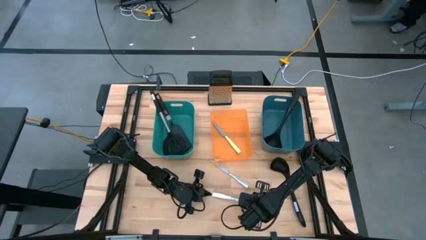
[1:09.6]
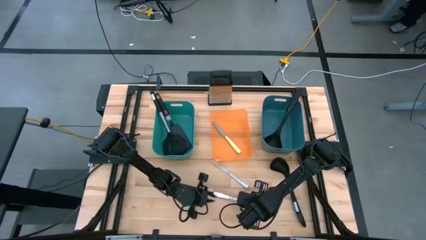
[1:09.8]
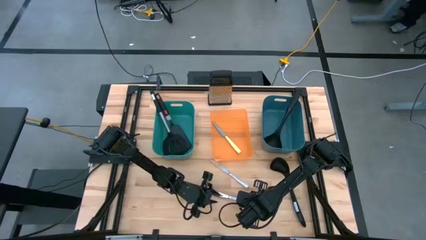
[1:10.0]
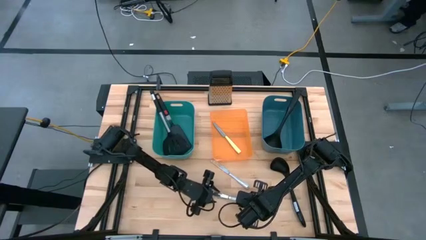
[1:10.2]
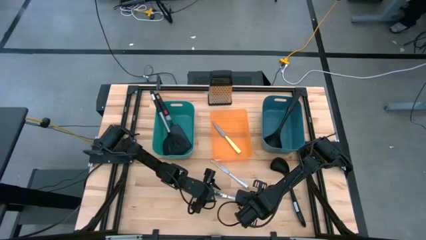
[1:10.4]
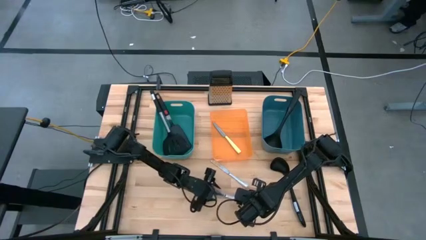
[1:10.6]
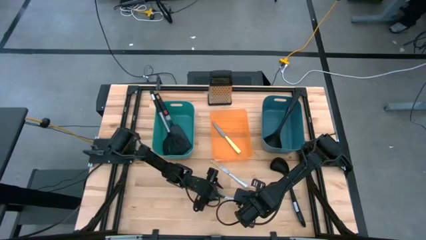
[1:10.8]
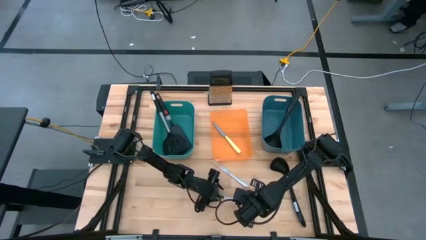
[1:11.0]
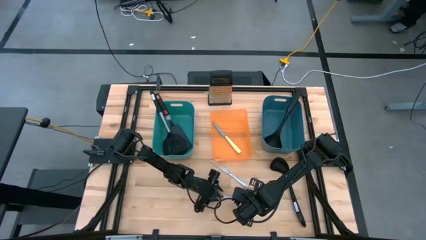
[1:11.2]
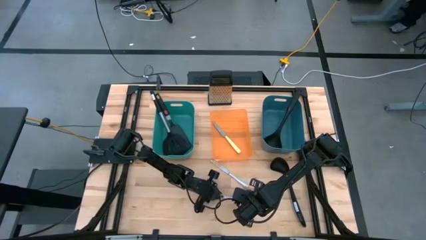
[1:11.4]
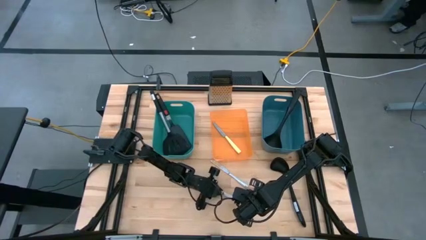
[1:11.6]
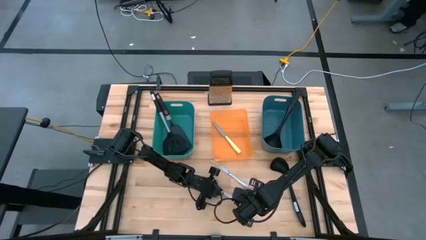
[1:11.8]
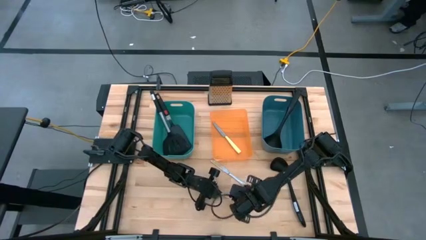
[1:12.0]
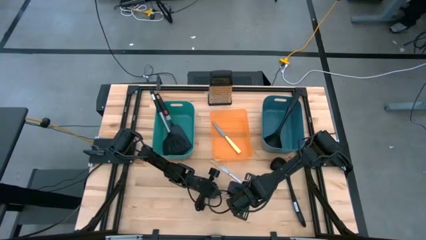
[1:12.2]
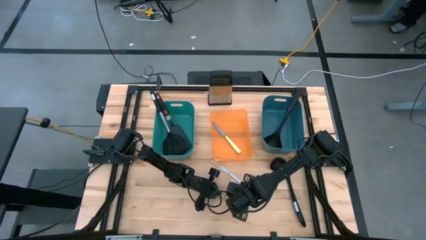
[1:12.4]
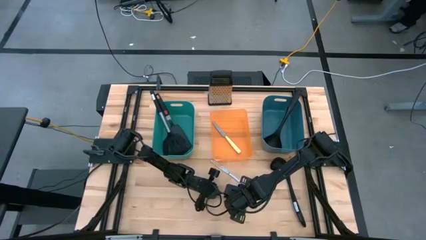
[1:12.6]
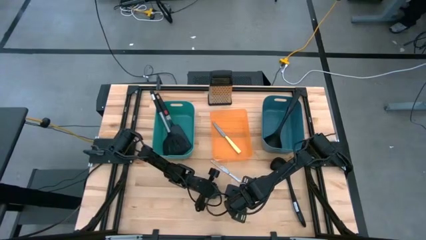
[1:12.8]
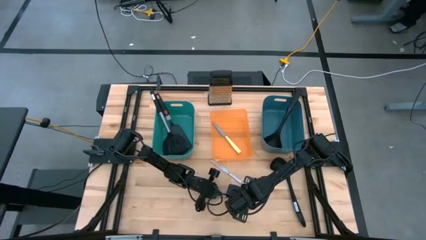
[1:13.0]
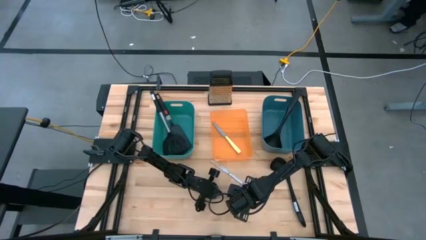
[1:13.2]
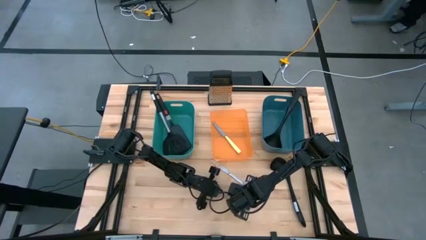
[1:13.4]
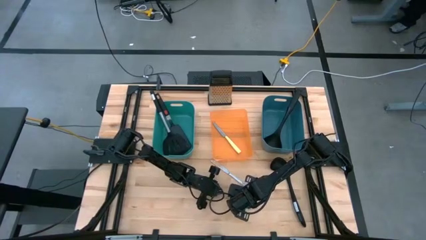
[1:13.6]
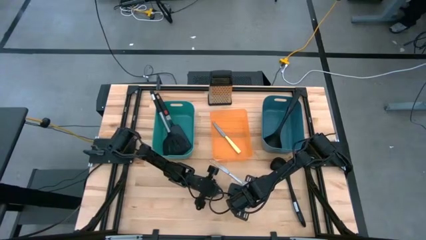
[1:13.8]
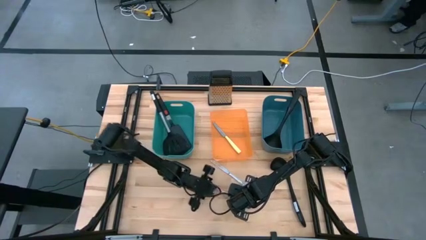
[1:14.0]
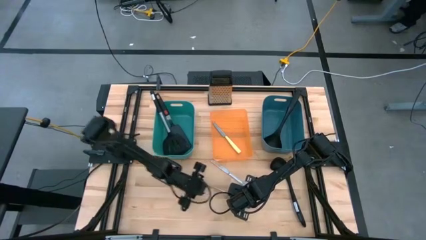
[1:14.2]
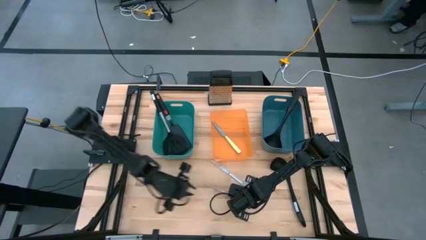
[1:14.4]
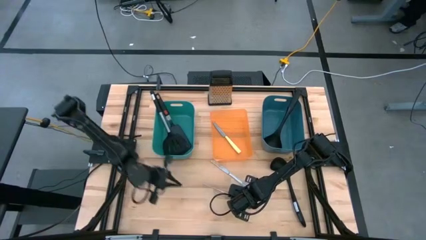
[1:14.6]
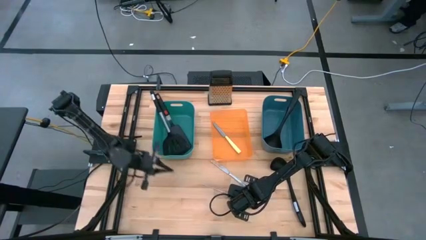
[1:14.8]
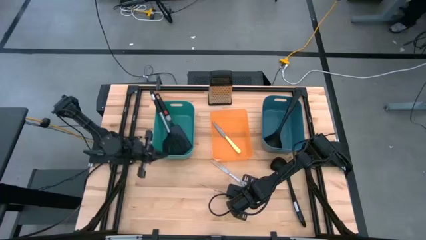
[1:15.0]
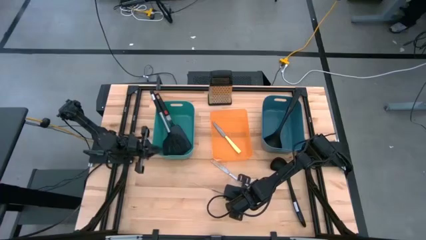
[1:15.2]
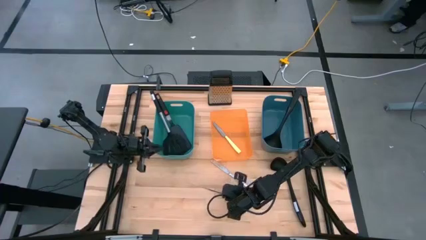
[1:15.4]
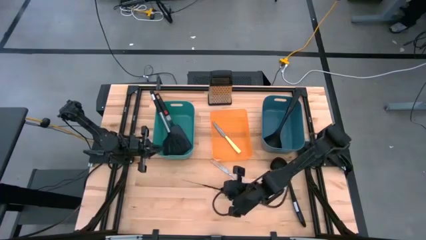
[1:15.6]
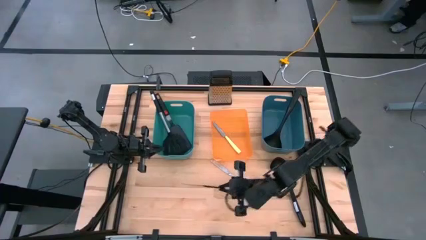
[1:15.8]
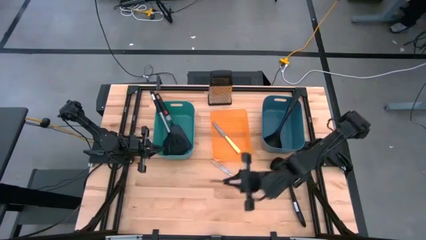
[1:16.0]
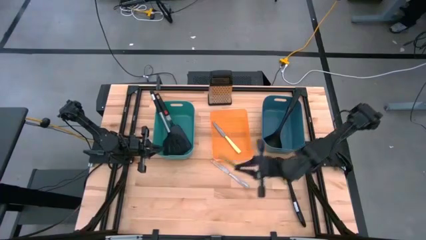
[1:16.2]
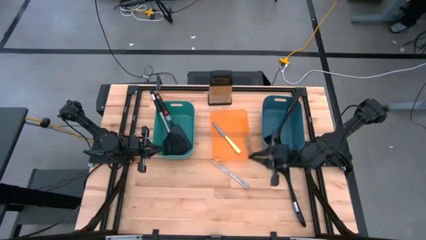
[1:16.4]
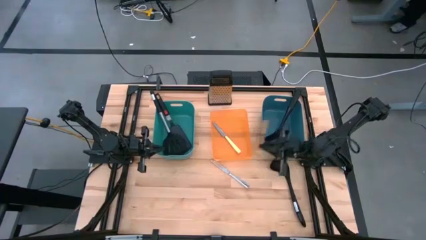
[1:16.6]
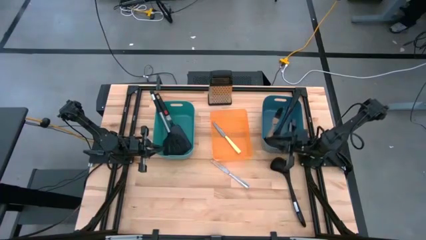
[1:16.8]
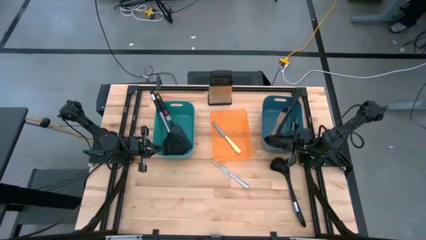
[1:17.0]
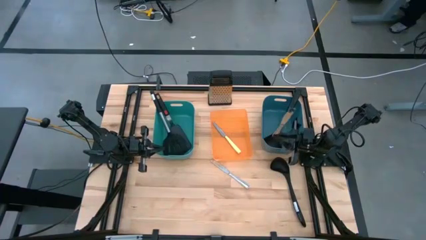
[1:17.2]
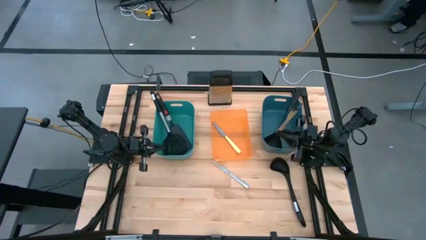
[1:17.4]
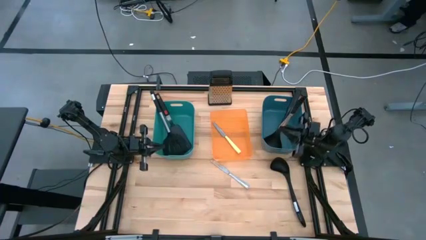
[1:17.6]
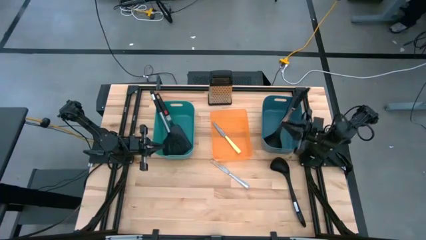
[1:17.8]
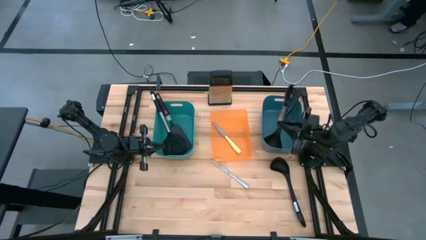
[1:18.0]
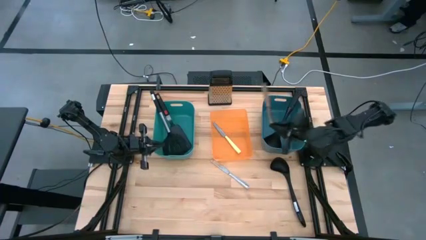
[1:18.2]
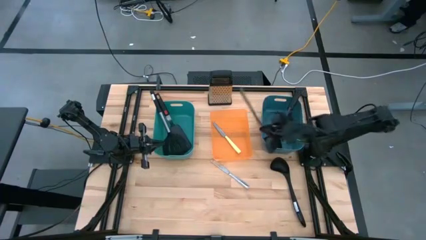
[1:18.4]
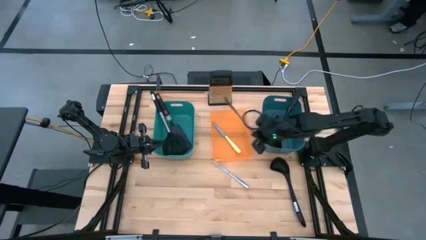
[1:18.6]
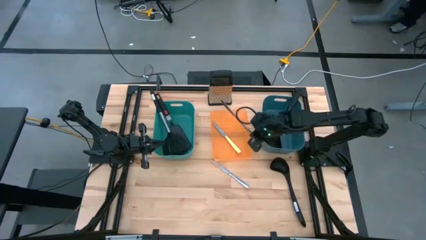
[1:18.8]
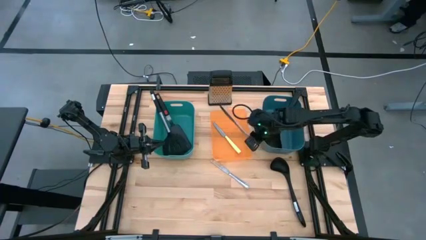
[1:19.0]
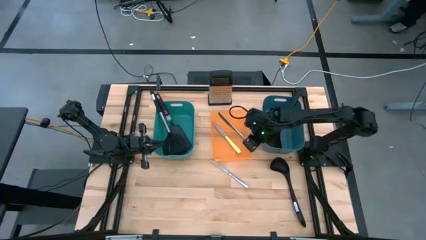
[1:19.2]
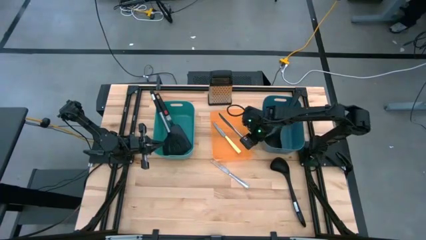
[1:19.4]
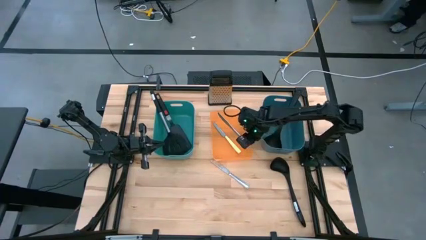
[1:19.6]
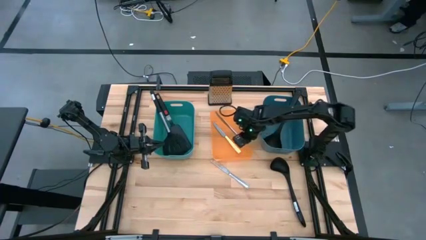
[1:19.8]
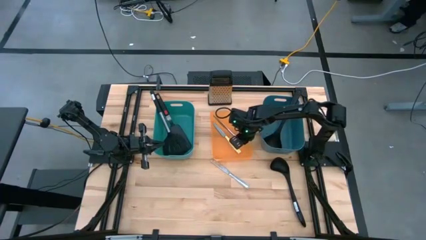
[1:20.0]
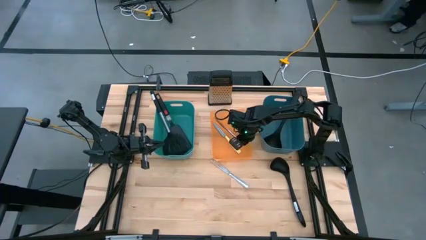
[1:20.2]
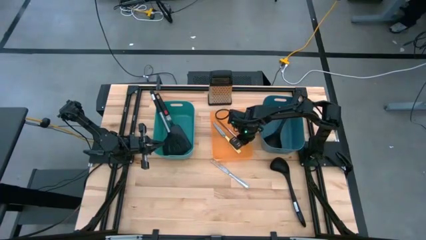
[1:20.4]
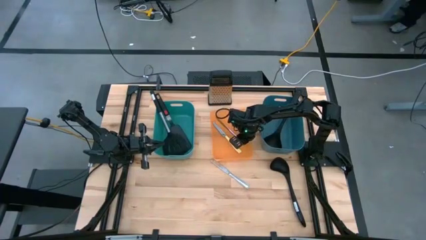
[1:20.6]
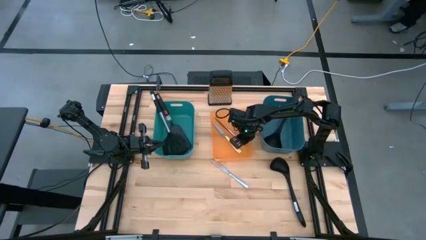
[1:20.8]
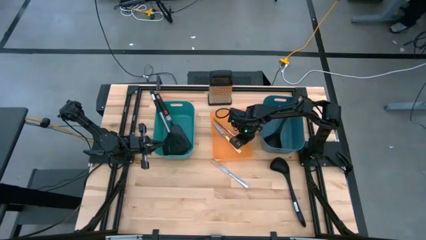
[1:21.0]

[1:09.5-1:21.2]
Task: Pick & Place Kitchen Items
Put the bottom silver knife into the orange bin

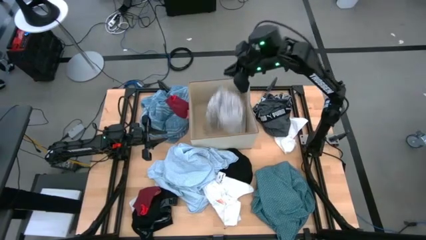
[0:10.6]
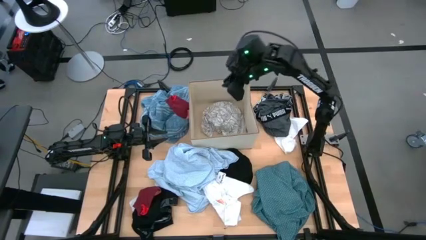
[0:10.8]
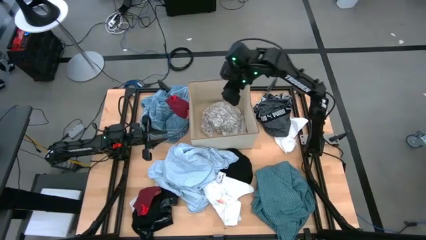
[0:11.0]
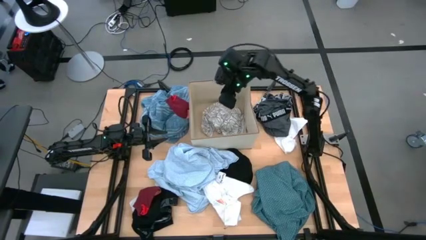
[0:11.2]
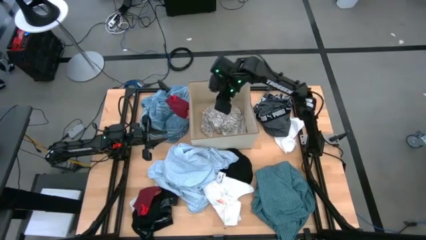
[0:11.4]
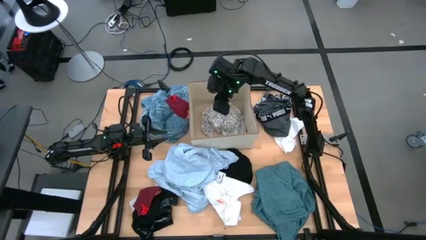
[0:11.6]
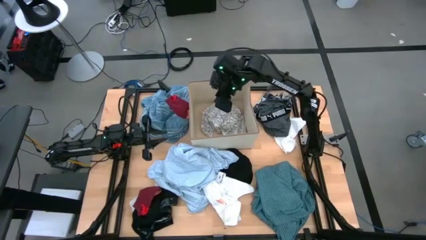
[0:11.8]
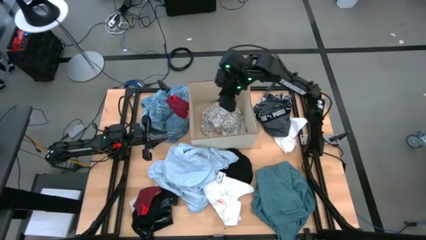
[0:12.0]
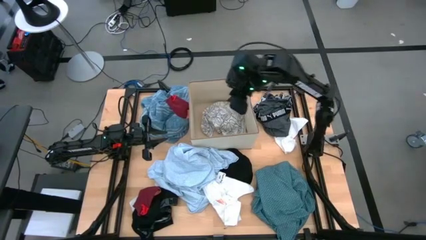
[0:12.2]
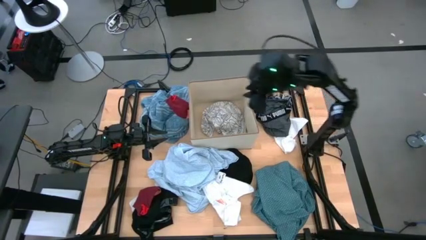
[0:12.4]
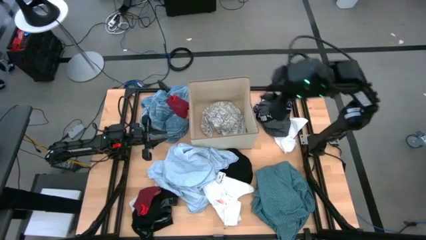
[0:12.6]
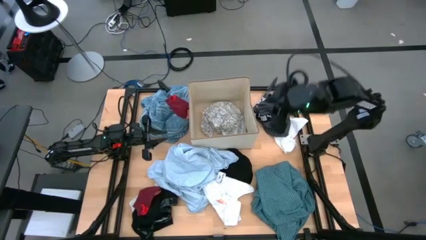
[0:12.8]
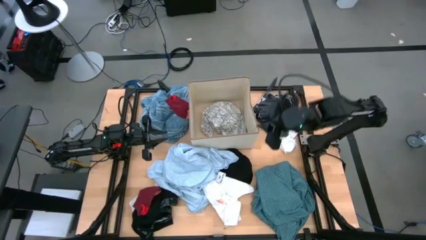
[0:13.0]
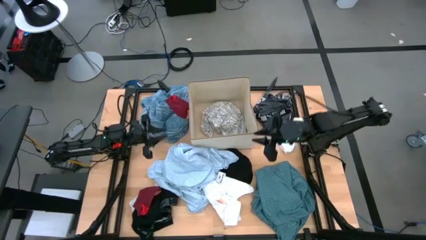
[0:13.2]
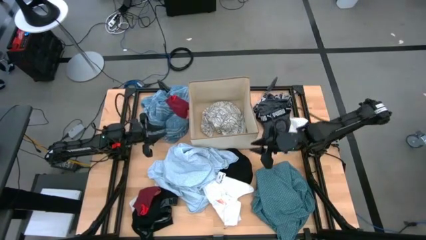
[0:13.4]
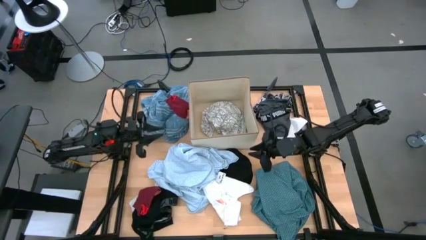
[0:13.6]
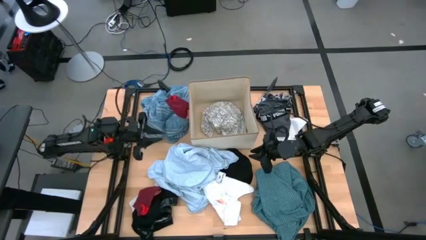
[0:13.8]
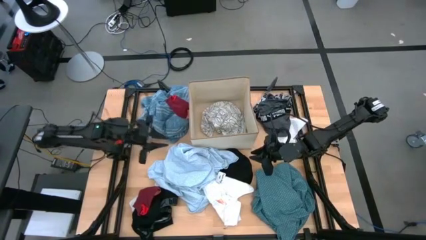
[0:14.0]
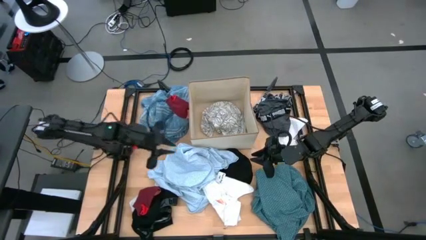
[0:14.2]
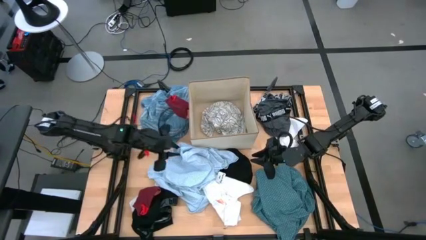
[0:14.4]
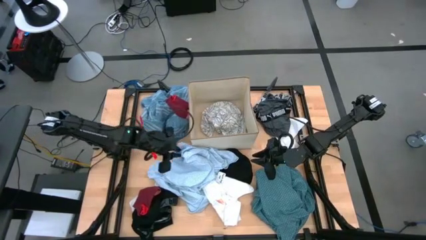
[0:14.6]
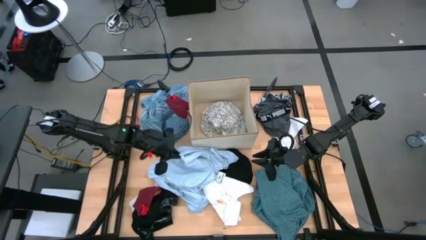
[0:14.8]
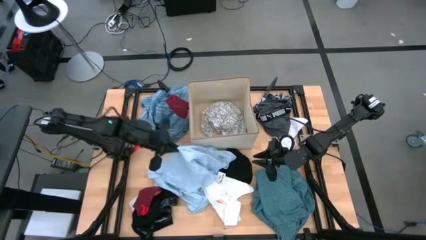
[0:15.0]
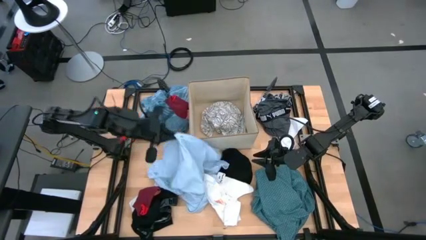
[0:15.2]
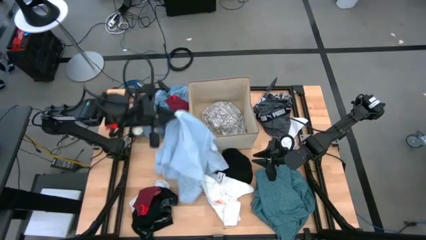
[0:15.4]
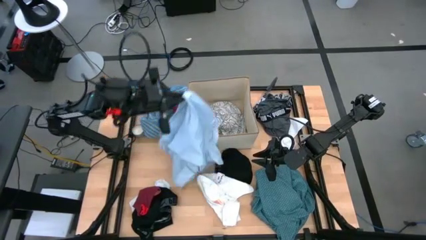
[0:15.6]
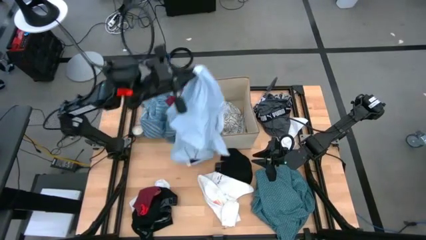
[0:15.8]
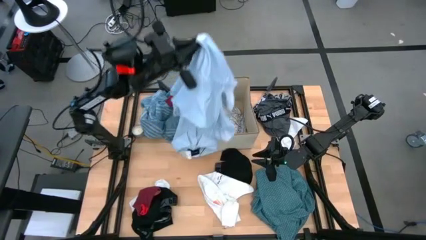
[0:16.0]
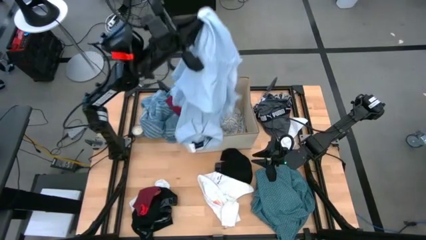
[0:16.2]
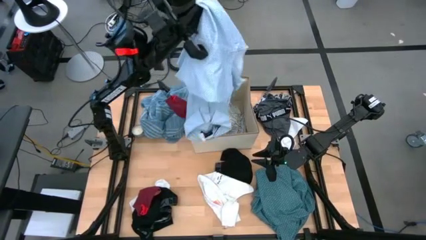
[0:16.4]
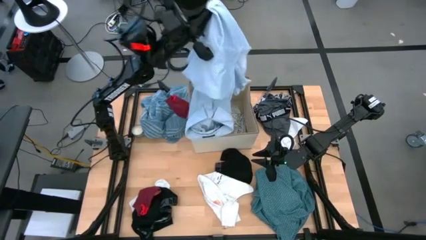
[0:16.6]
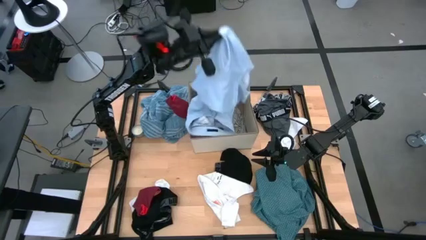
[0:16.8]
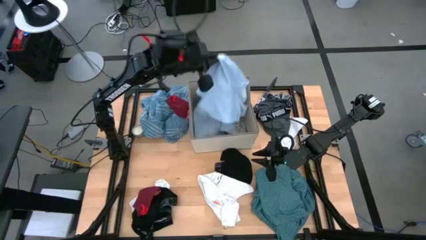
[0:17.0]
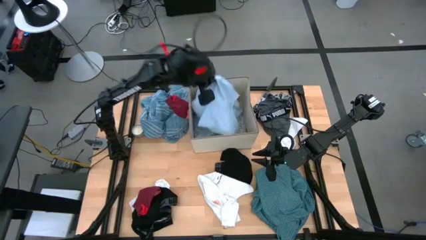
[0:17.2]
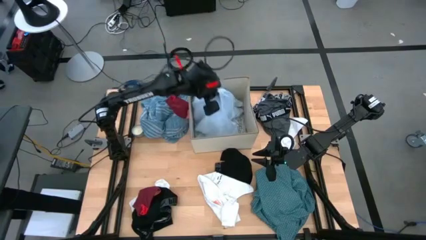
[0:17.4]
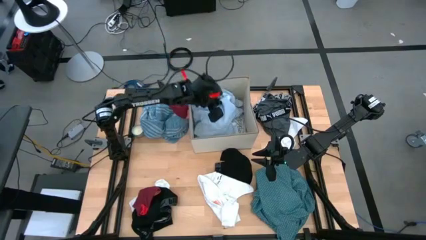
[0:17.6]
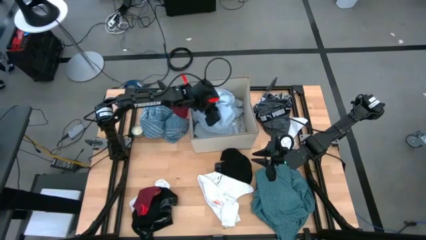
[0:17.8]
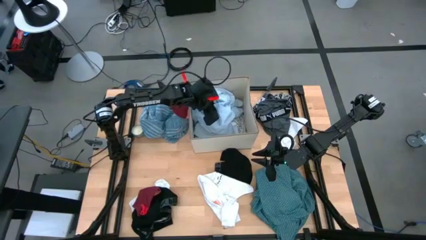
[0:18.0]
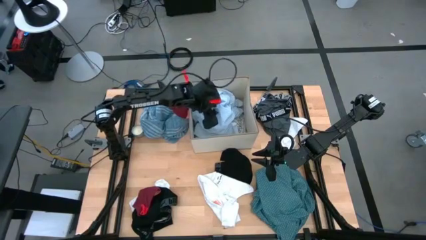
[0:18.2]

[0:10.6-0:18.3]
Task: Sort clothes
Put the gray shirt into the bin
